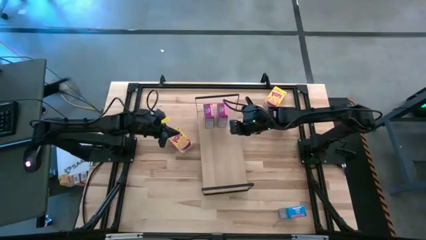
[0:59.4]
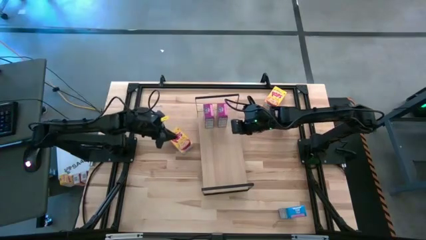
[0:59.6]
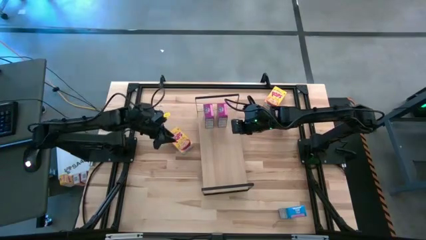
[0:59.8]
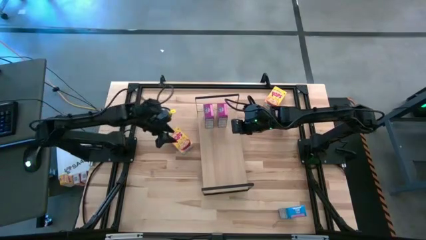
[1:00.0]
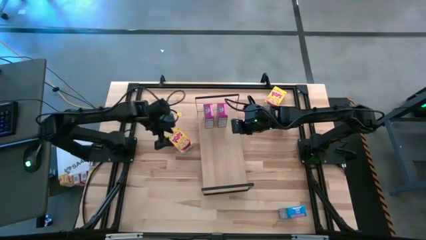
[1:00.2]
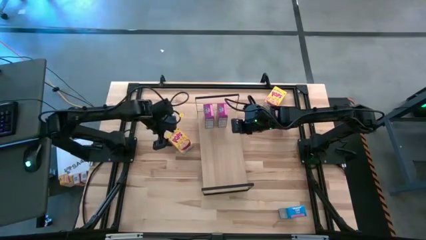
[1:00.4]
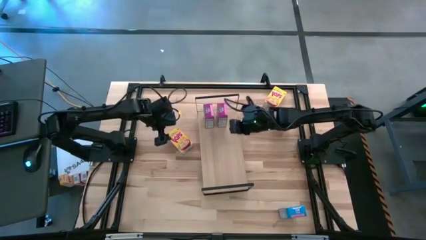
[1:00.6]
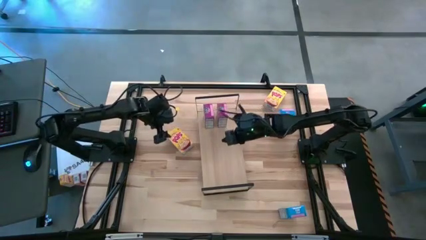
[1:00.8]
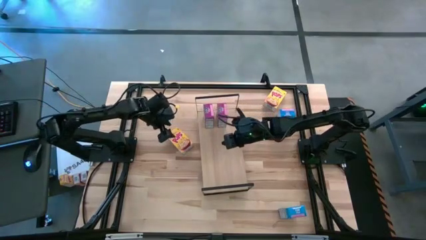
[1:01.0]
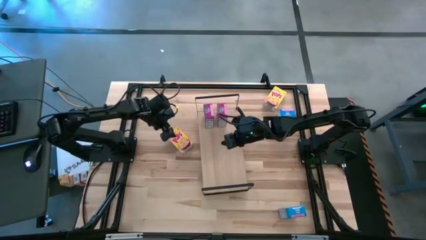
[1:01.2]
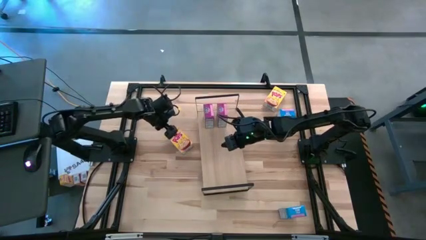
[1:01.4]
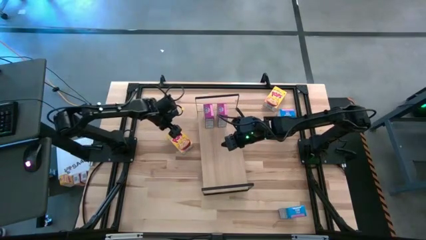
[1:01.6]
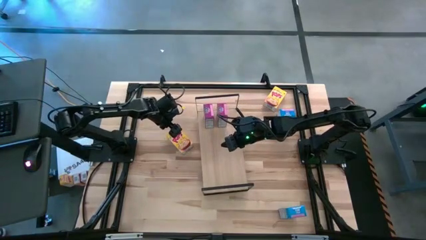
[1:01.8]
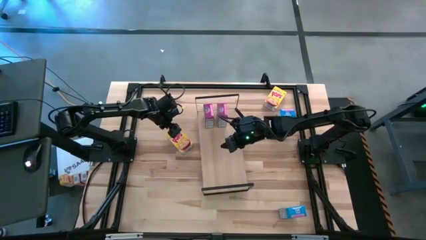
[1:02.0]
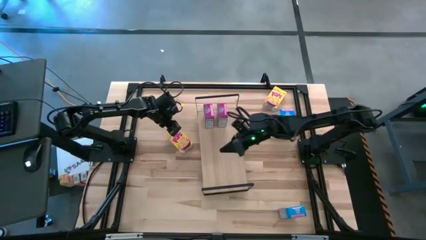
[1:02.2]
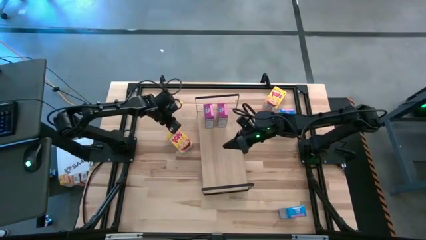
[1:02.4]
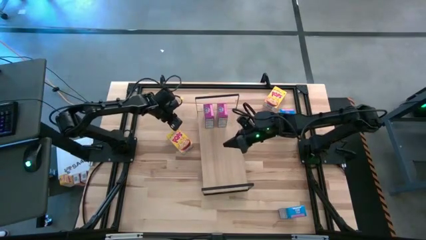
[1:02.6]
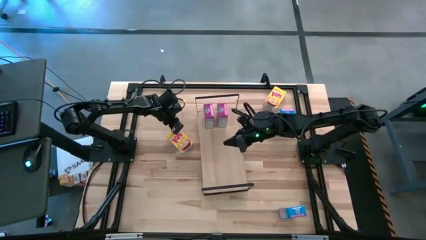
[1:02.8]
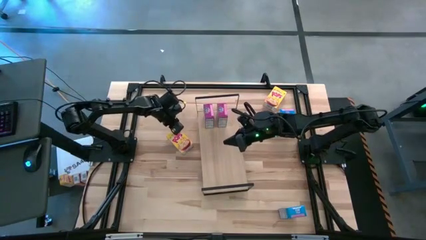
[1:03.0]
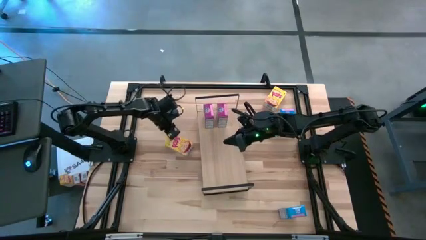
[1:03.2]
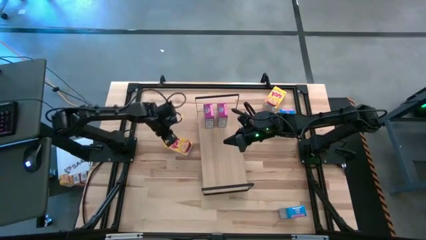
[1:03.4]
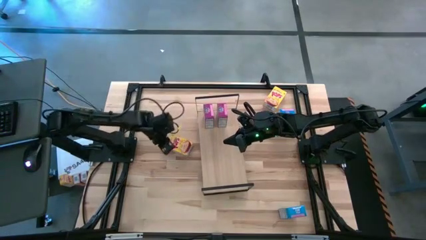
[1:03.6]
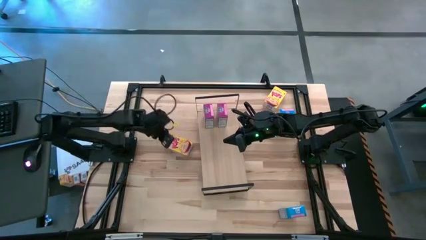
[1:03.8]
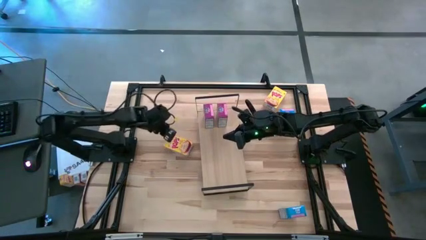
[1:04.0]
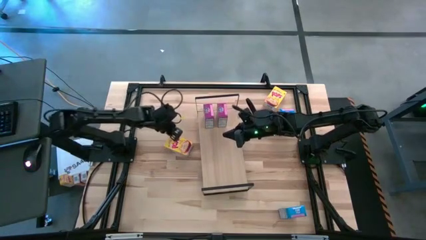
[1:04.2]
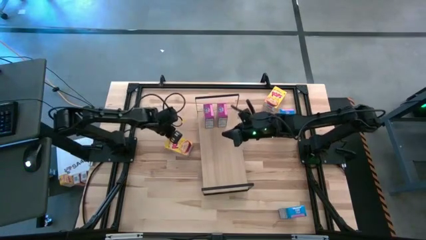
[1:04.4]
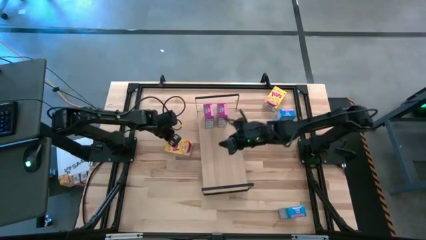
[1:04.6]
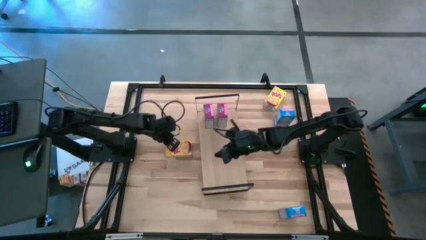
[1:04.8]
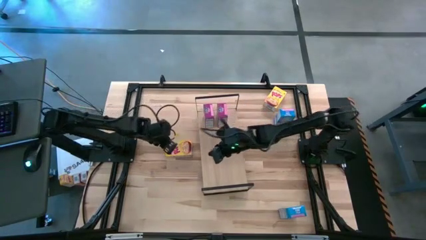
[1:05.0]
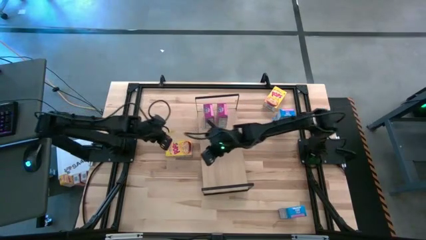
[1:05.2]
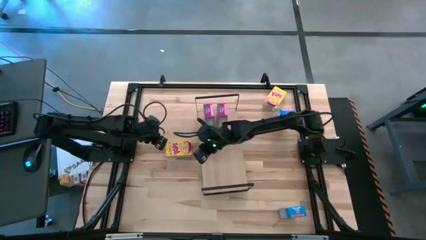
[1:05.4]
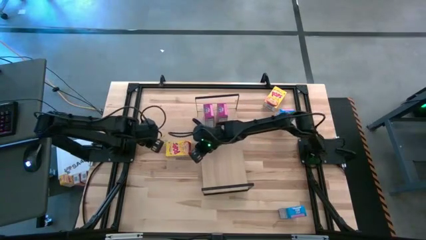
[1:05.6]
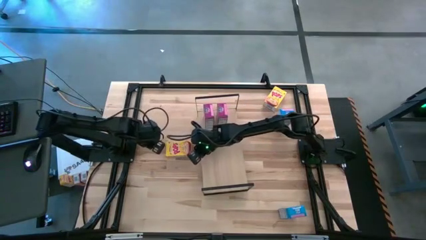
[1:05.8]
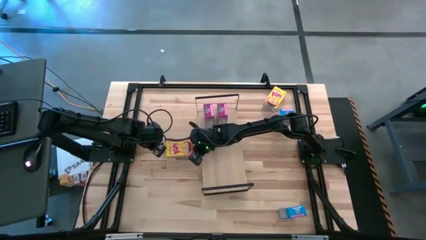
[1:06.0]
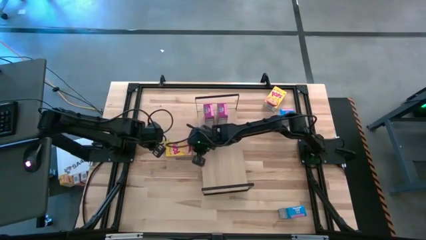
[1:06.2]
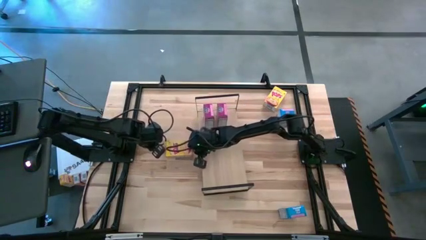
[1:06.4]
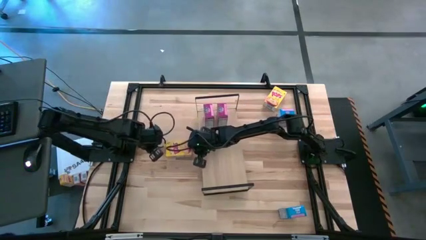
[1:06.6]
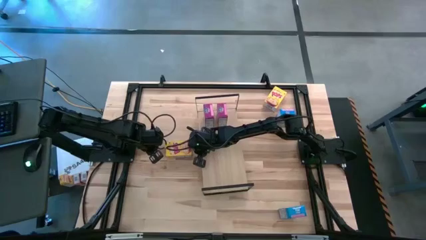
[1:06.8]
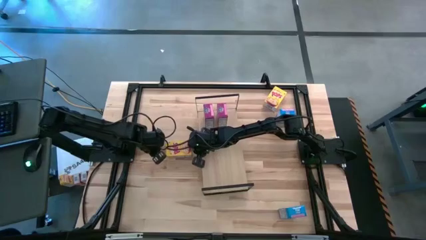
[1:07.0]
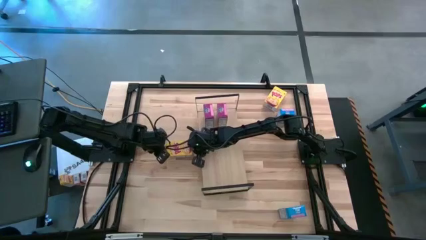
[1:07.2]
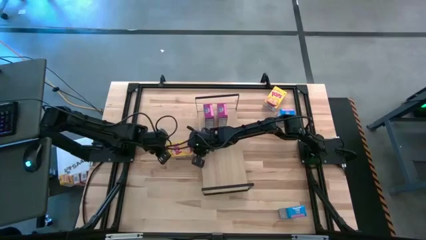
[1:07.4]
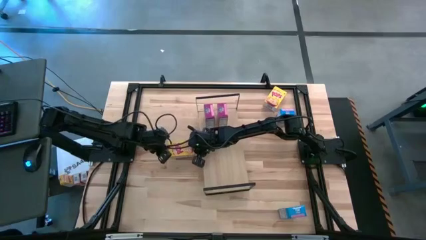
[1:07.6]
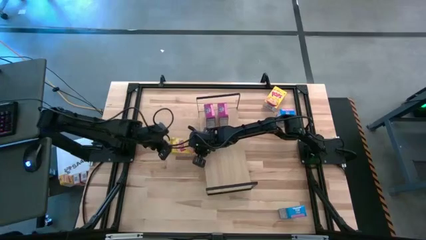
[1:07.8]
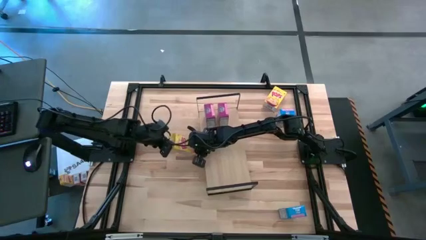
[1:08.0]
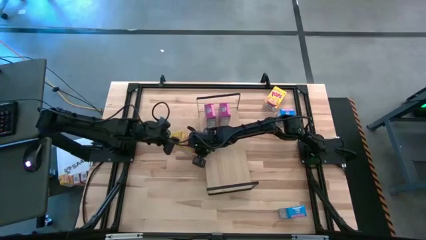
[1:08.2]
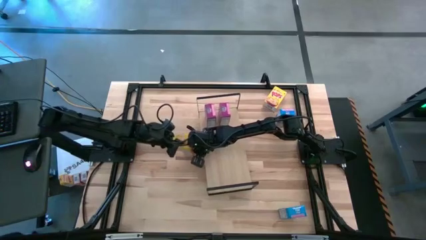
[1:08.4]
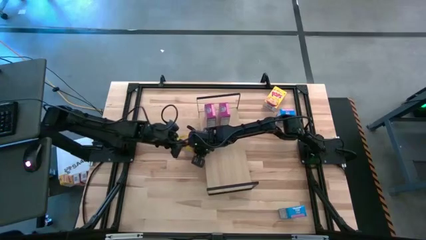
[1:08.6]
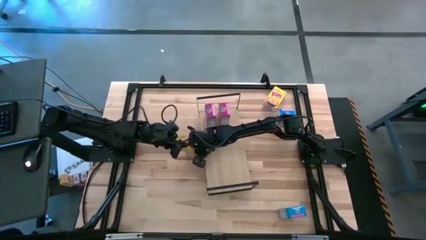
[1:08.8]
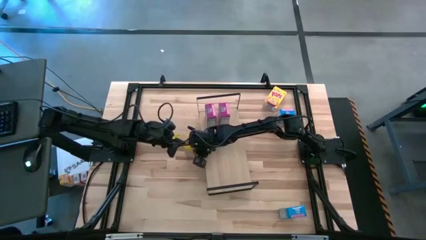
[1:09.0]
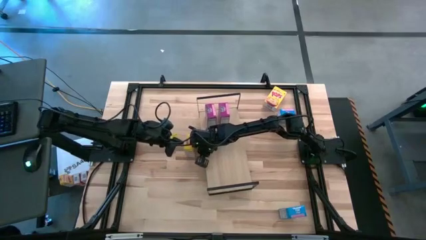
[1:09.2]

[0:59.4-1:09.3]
Task: Stack cereal on shelf
Put the left yellow cereal box on the shelf
